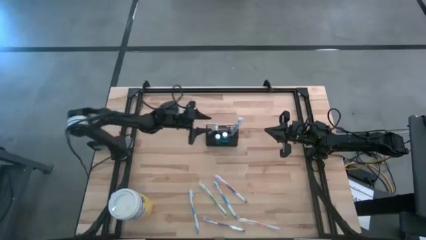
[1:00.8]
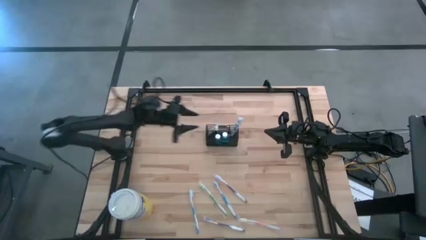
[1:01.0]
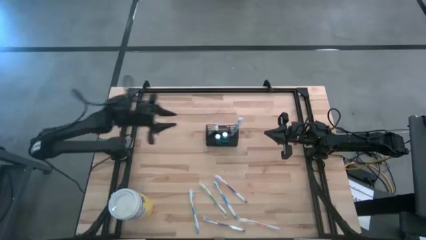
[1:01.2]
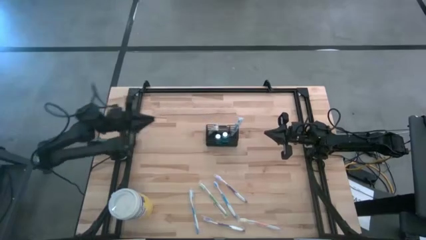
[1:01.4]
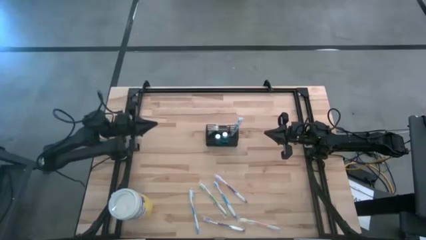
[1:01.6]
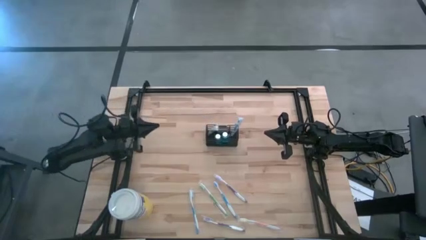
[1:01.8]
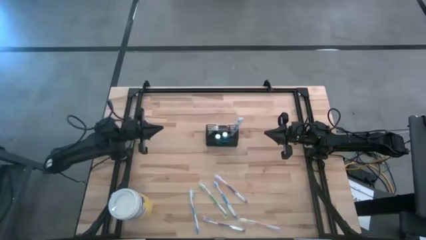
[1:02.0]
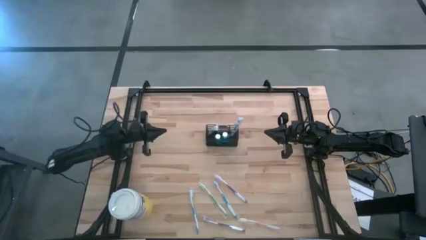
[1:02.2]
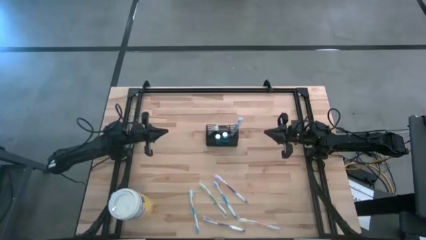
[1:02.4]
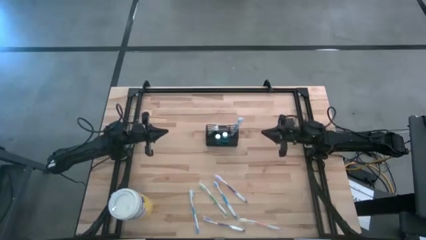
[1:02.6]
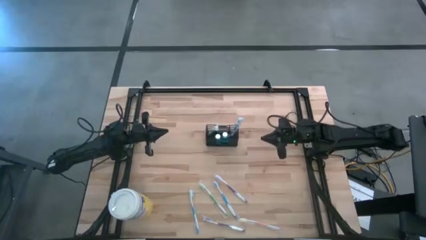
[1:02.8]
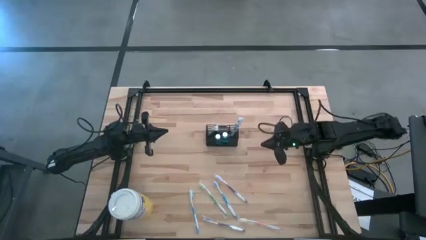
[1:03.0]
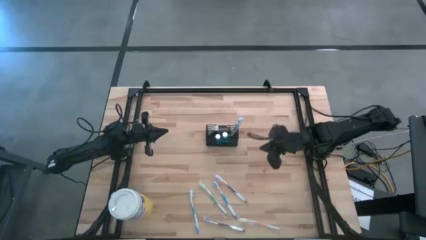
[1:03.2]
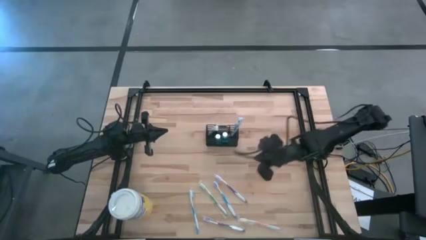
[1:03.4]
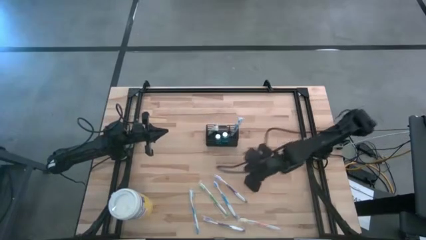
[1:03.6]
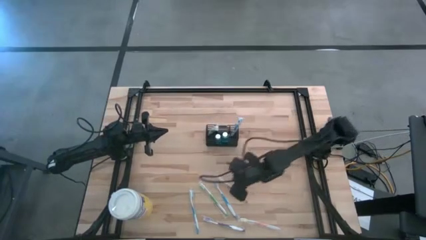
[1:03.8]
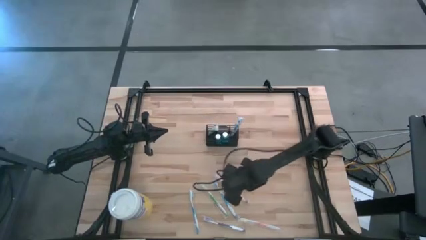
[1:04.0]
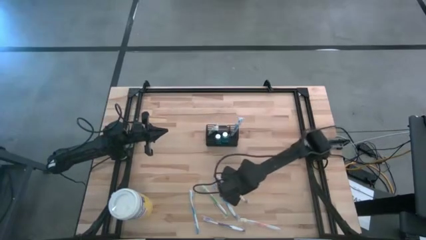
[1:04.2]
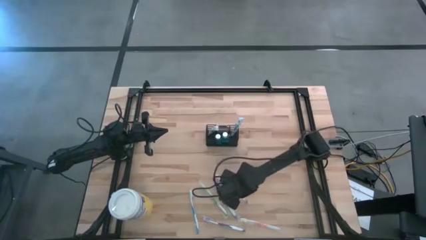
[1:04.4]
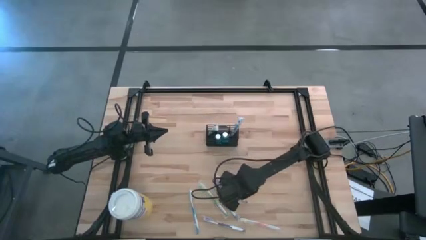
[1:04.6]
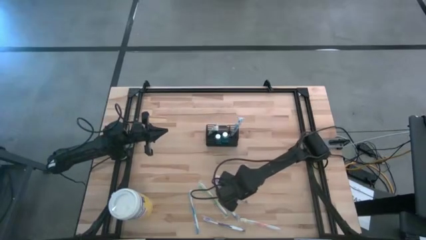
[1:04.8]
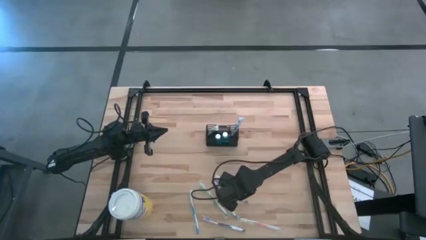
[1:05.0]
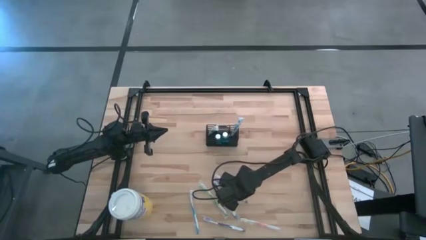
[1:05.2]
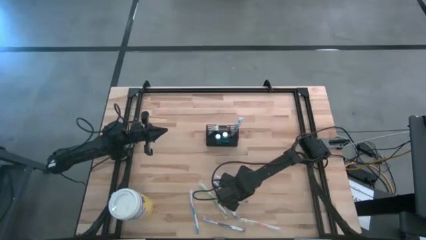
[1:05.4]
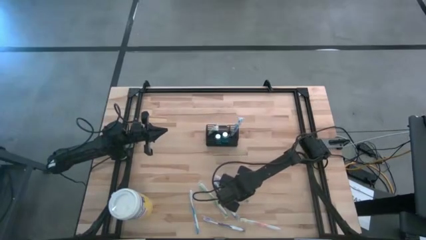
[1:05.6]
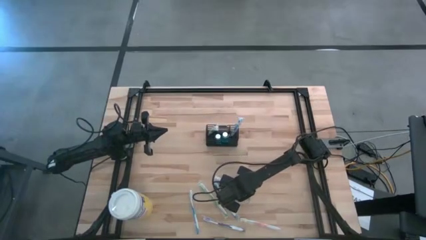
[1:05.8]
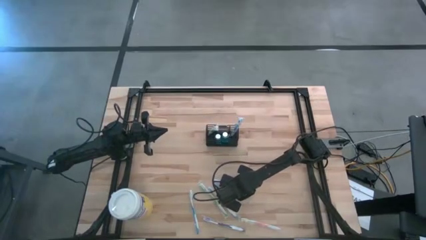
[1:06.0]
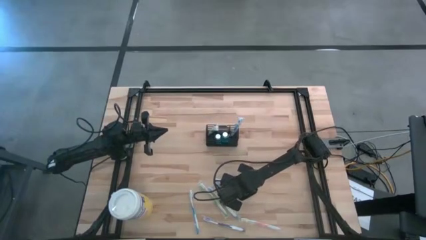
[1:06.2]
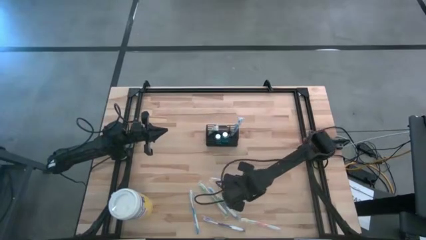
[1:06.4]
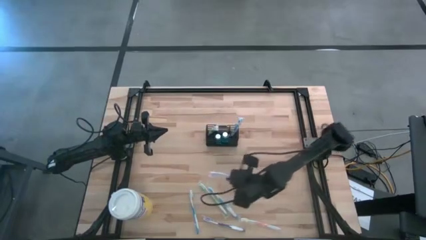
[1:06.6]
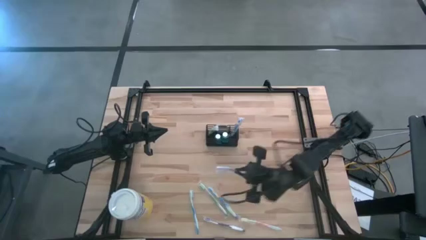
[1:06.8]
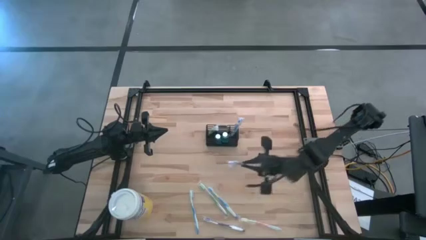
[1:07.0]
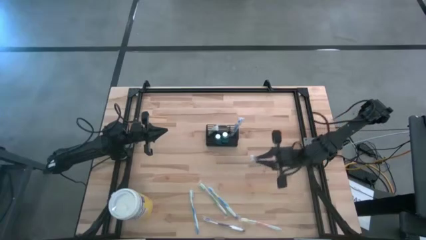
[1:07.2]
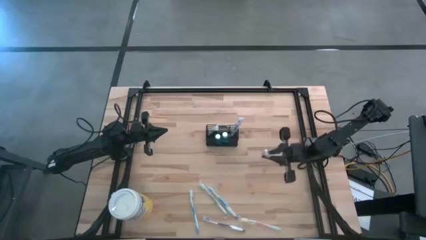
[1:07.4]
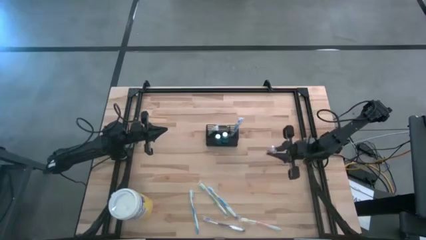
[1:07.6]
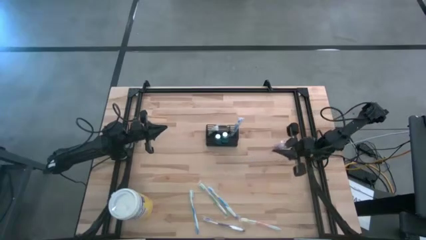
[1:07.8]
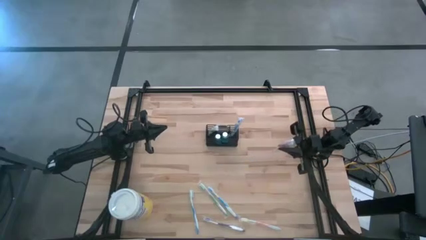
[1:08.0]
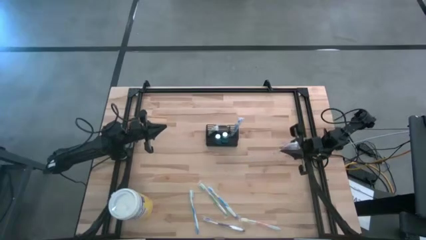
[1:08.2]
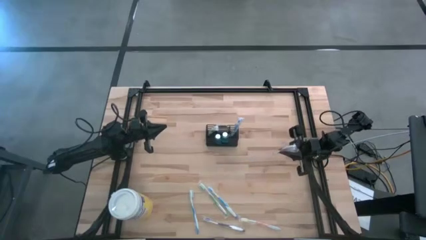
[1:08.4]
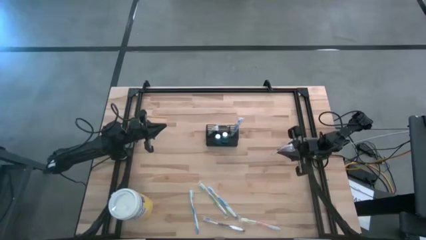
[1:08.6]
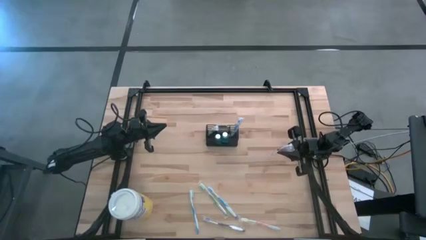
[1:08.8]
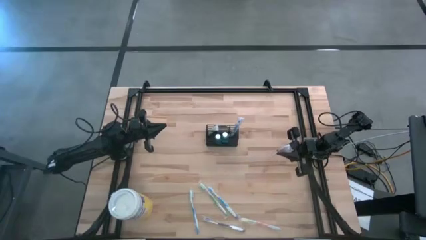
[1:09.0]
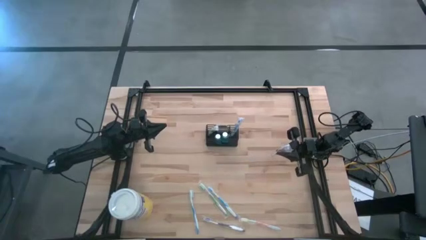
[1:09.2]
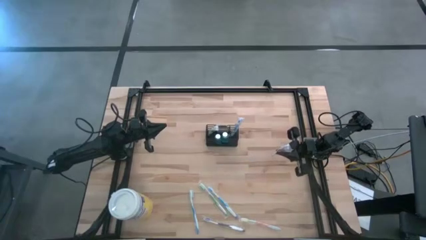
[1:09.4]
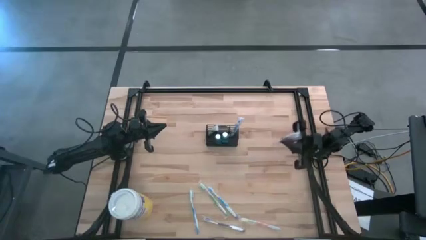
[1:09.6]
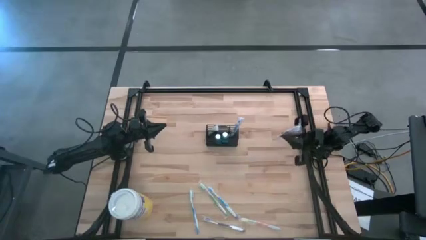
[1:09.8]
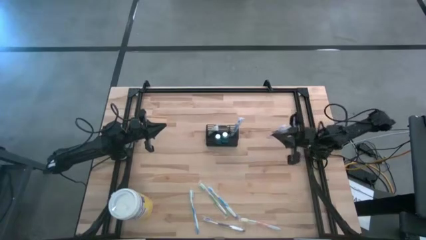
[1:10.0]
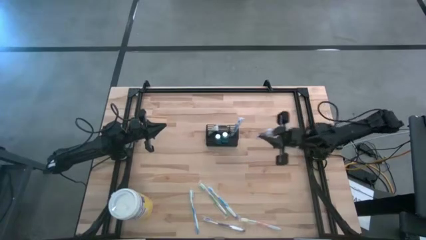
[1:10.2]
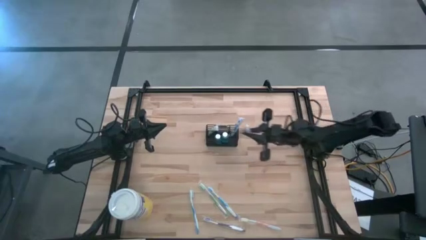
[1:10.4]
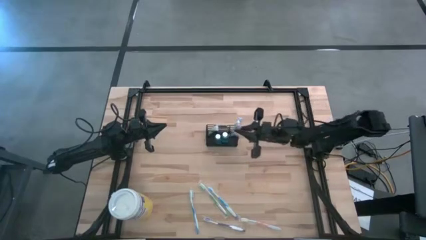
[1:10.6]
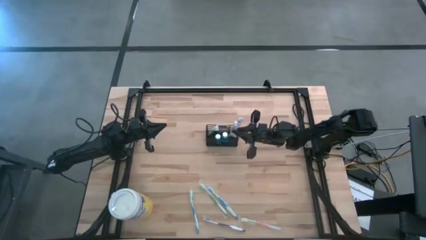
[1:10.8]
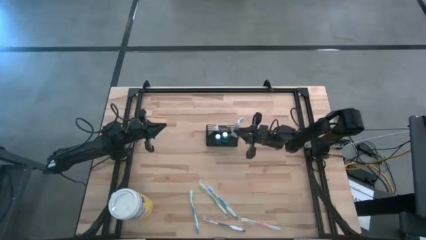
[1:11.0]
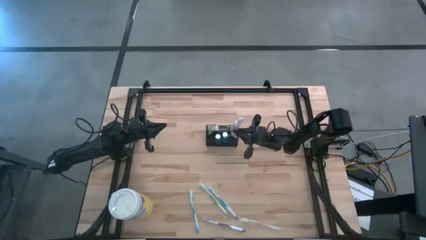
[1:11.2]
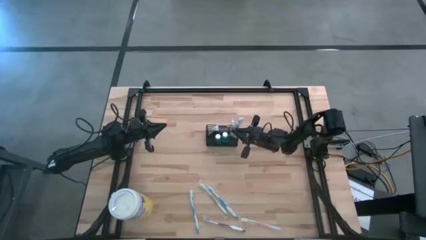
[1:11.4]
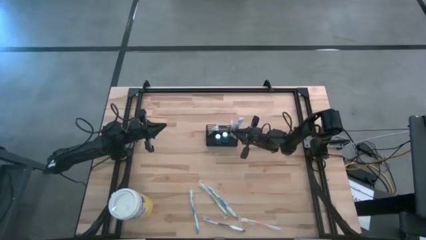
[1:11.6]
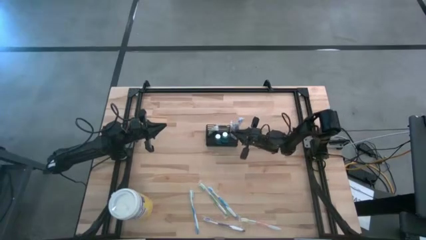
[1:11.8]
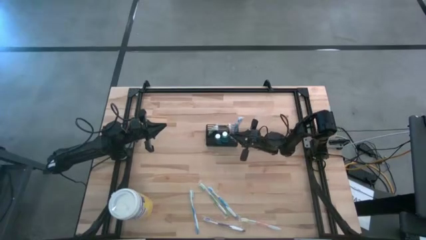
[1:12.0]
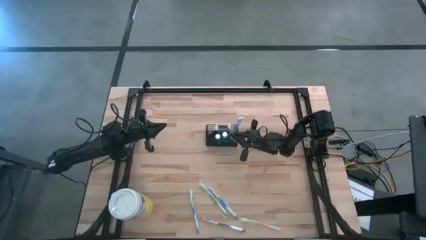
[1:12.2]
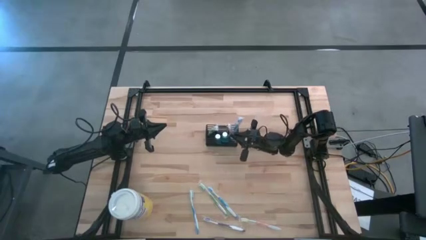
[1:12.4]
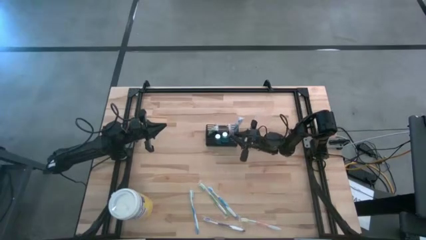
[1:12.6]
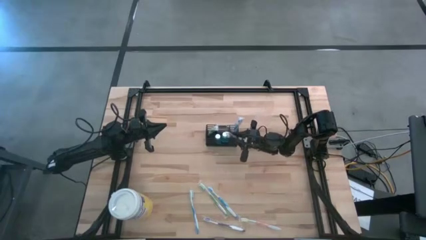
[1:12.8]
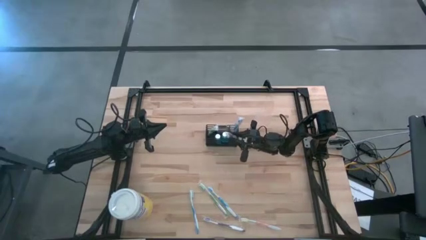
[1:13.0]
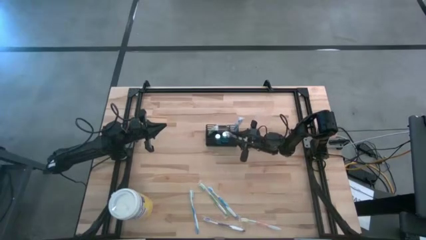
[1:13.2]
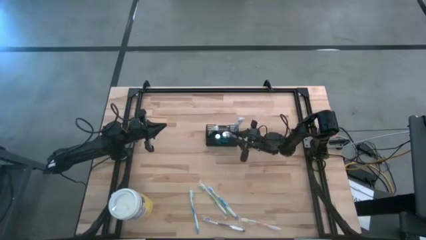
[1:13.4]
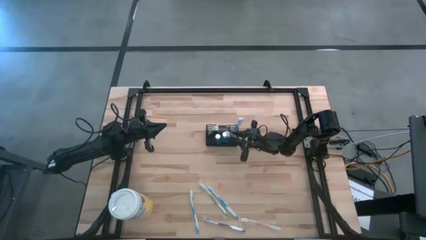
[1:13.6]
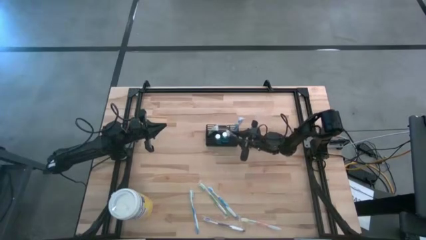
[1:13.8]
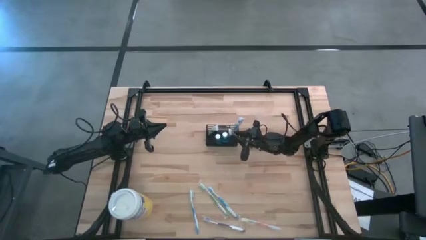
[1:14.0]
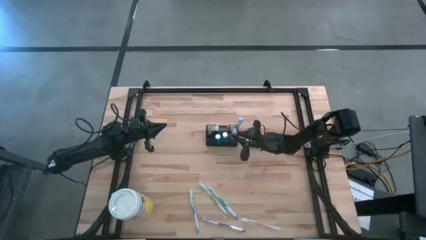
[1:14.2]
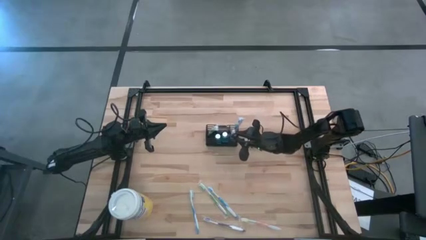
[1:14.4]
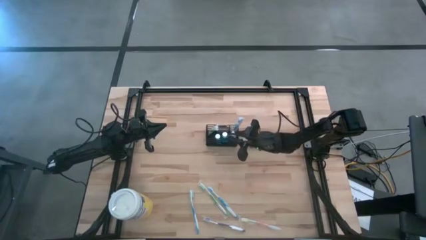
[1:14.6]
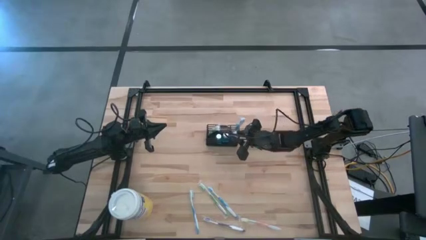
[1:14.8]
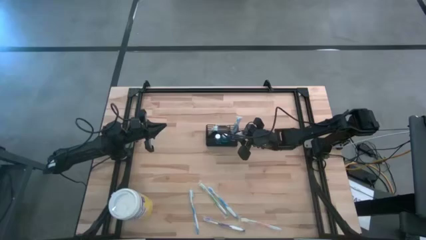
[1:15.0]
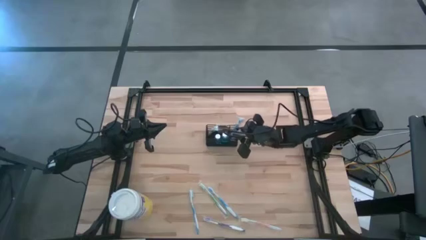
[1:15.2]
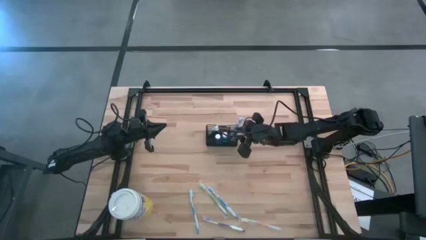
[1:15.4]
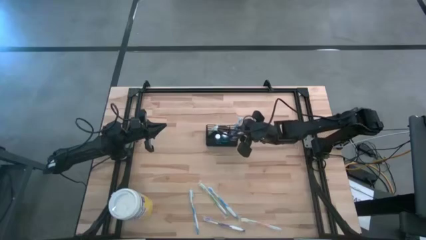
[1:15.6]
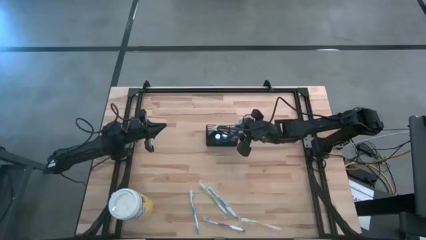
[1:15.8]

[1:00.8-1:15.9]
Task: Pick & Place toothbrushing station
Put the top purple toothbrush into the wire organizer

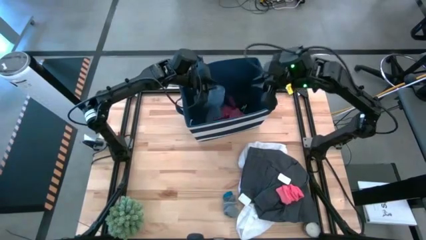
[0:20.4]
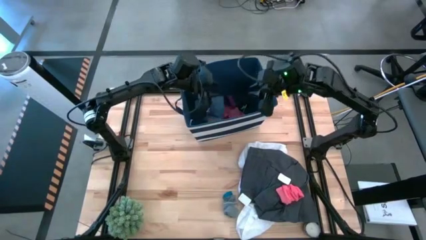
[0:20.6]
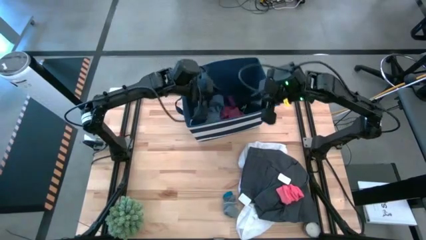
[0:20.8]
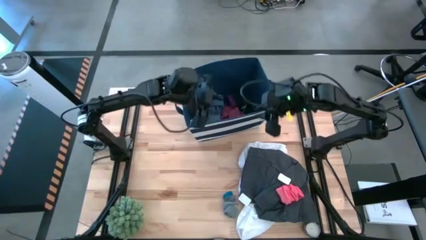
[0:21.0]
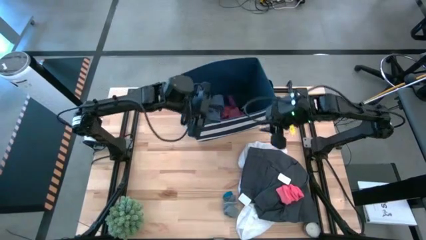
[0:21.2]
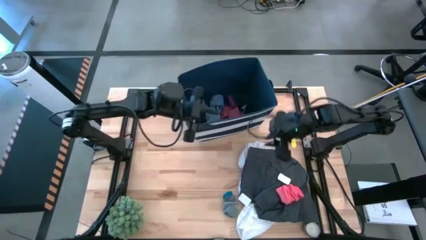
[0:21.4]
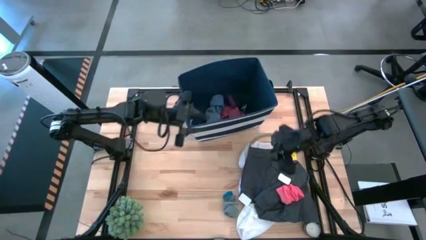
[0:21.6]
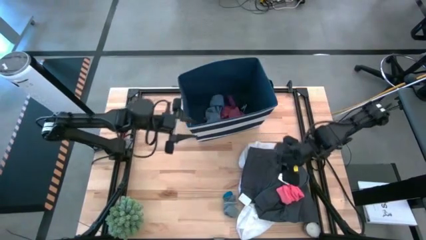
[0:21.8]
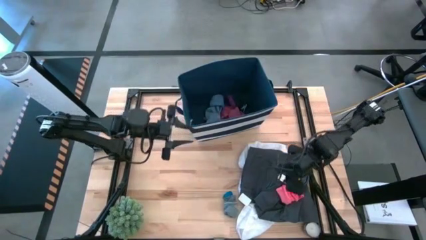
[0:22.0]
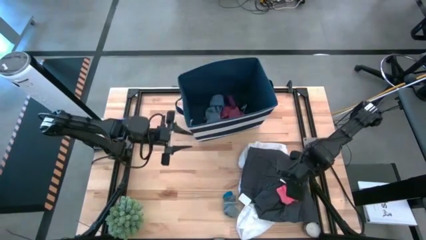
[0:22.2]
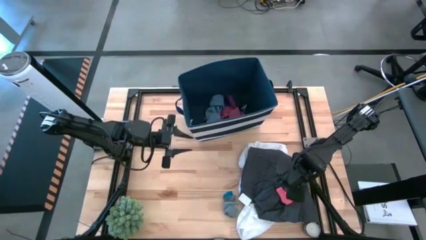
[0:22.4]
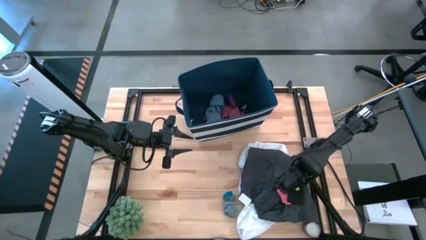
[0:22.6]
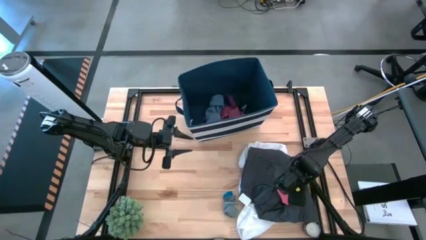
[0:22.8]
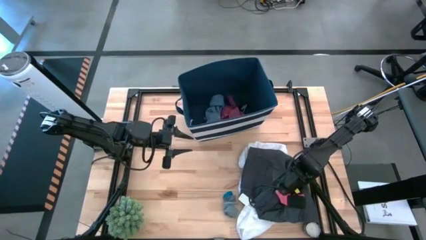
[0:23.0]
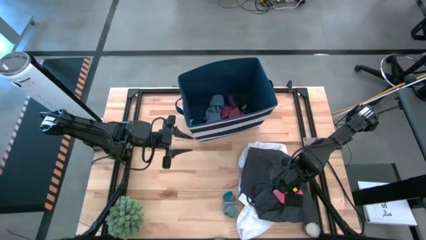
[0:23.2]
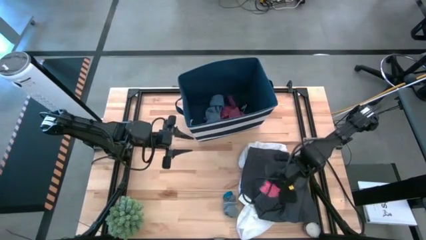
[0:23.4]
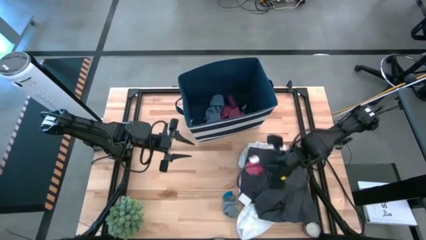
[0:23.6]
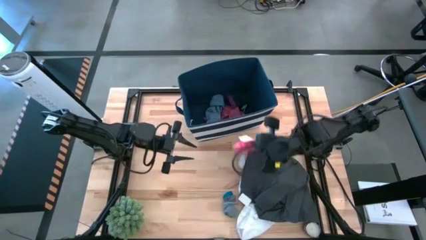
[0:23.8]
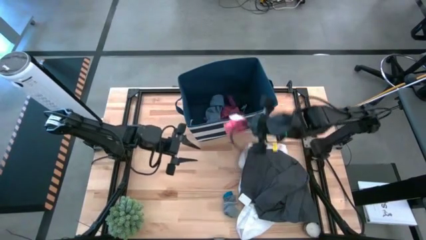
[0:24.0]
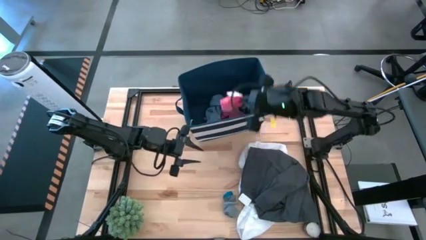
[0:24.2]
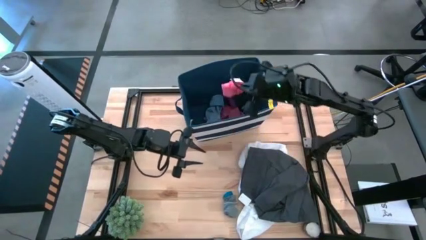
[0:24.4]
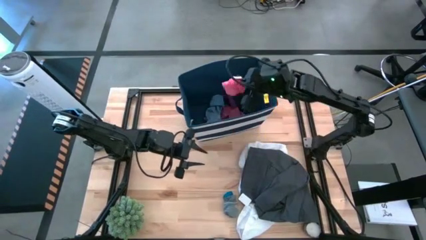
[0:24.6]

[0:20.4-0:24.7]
Task: Sort clothes
Put the pink socks into the laundry bin
